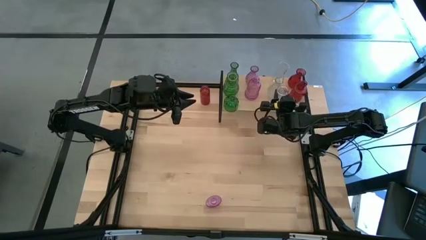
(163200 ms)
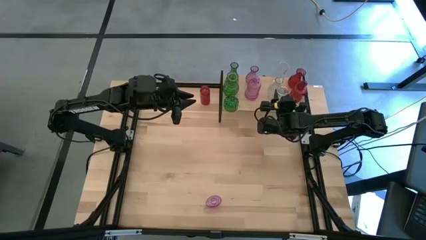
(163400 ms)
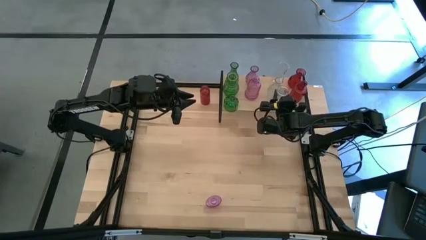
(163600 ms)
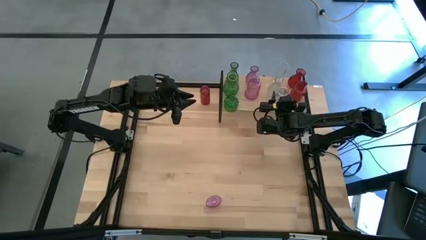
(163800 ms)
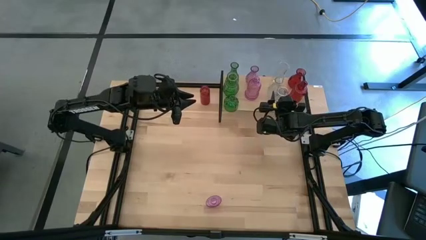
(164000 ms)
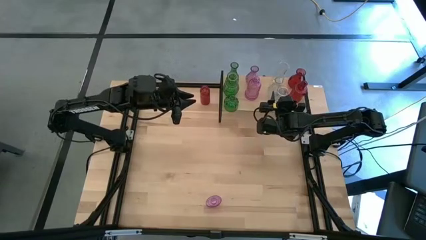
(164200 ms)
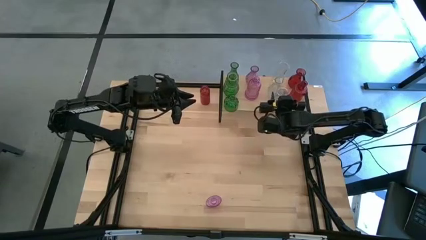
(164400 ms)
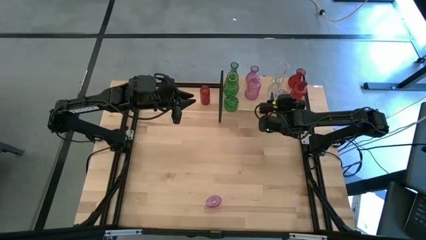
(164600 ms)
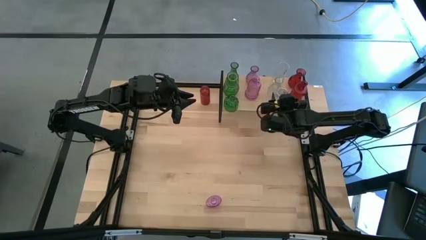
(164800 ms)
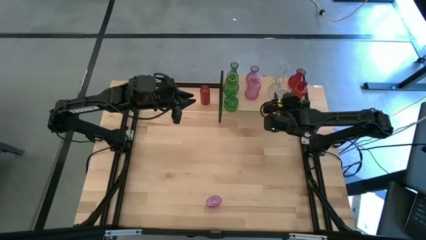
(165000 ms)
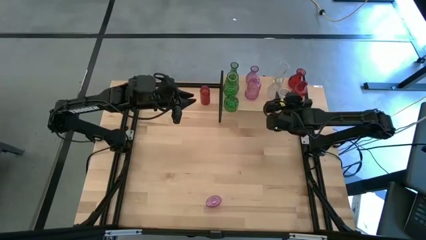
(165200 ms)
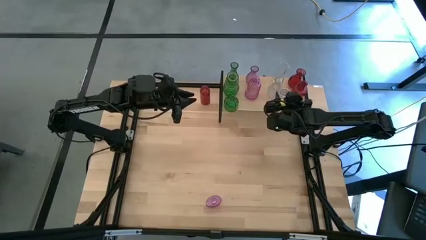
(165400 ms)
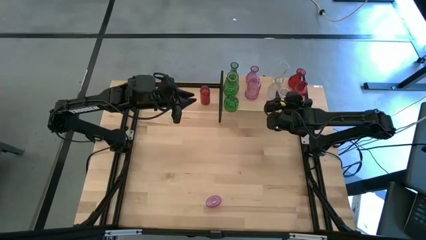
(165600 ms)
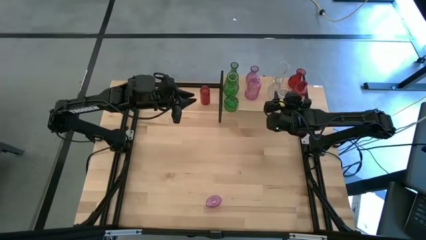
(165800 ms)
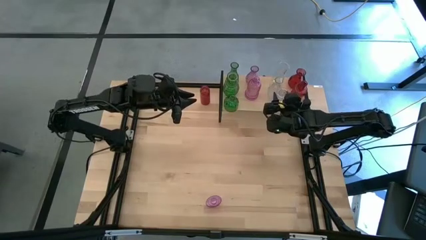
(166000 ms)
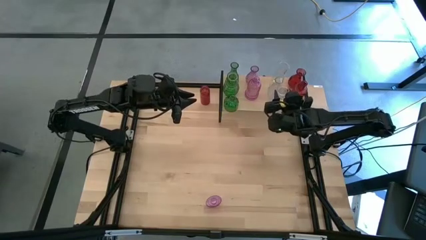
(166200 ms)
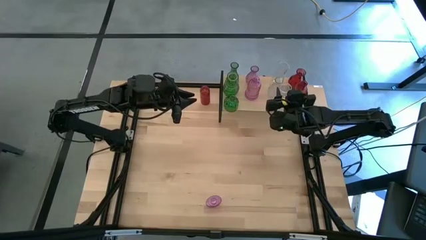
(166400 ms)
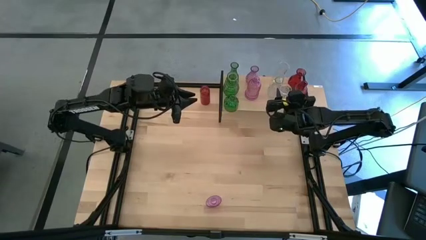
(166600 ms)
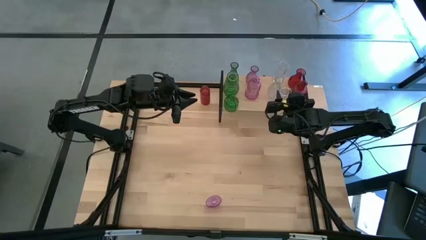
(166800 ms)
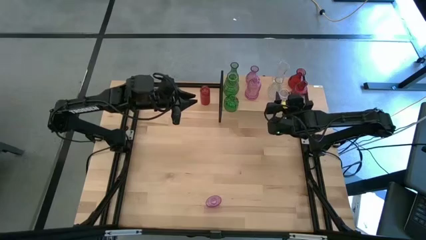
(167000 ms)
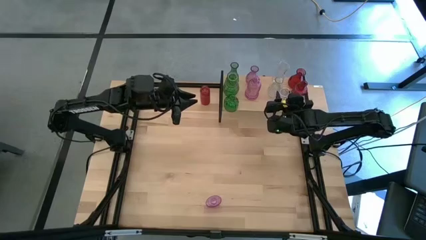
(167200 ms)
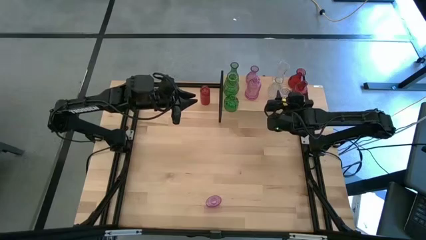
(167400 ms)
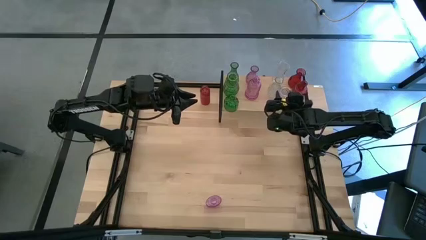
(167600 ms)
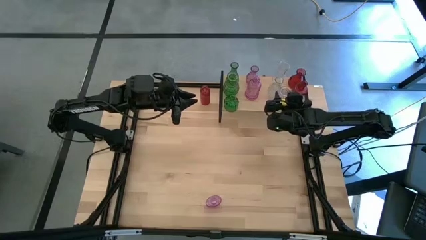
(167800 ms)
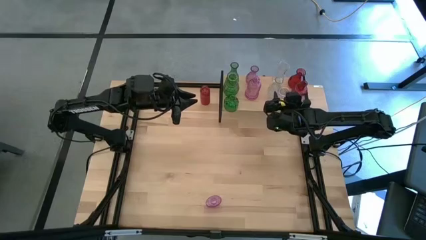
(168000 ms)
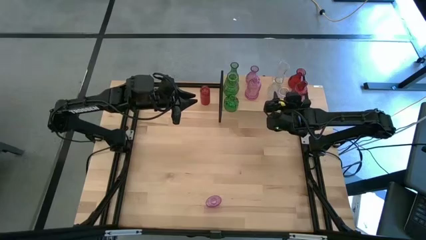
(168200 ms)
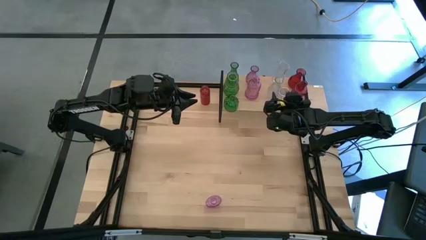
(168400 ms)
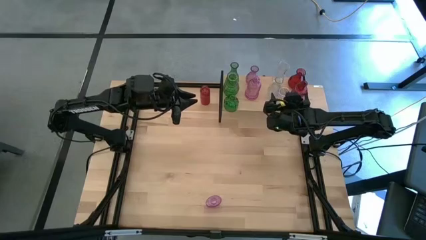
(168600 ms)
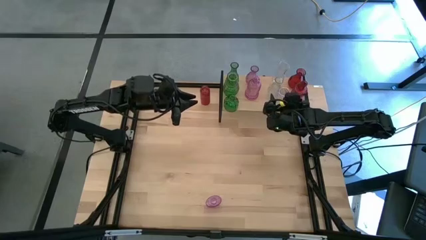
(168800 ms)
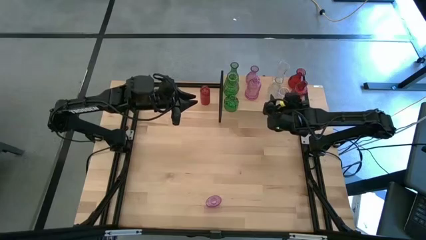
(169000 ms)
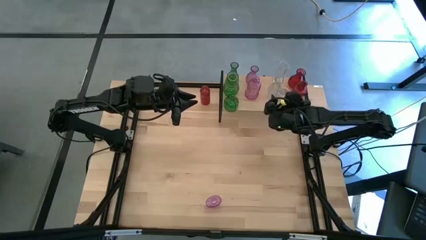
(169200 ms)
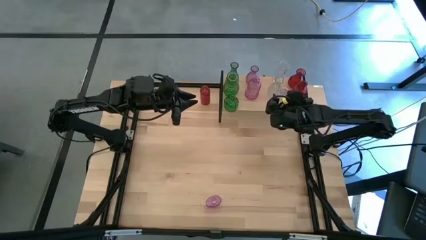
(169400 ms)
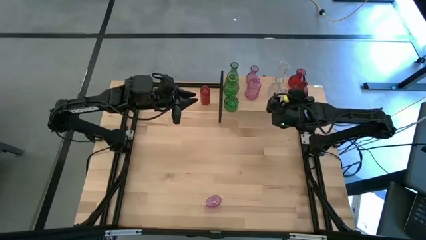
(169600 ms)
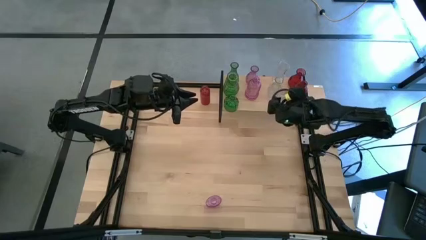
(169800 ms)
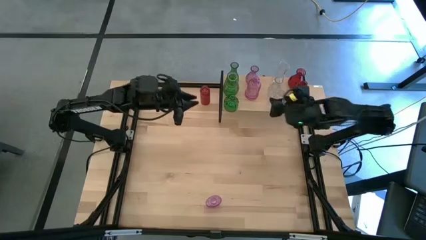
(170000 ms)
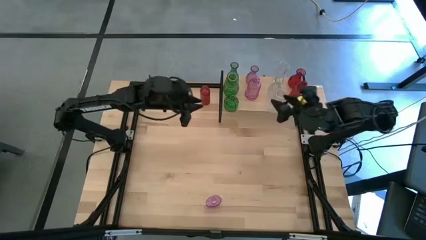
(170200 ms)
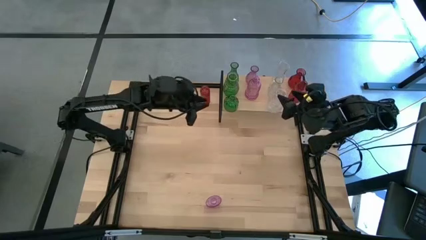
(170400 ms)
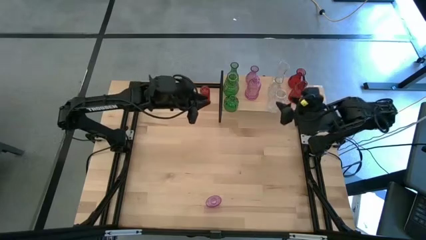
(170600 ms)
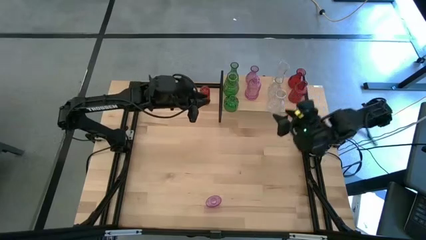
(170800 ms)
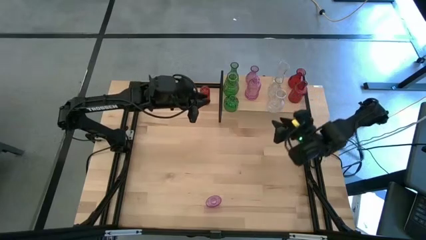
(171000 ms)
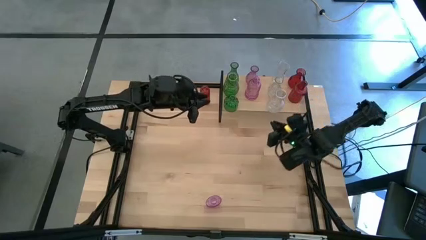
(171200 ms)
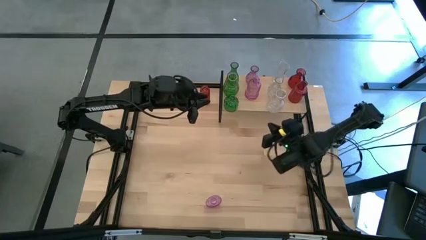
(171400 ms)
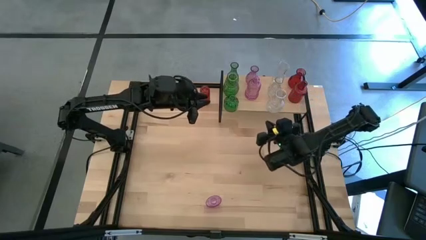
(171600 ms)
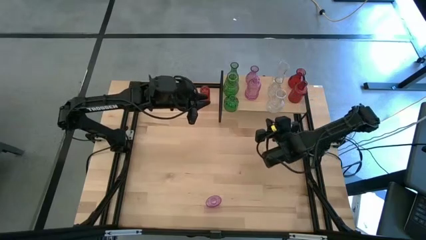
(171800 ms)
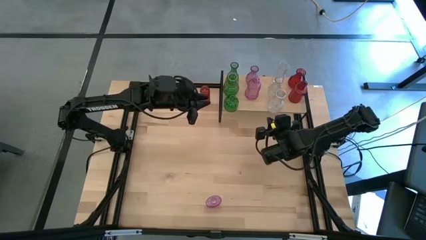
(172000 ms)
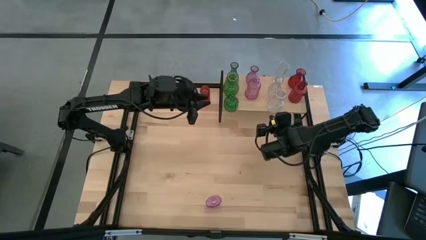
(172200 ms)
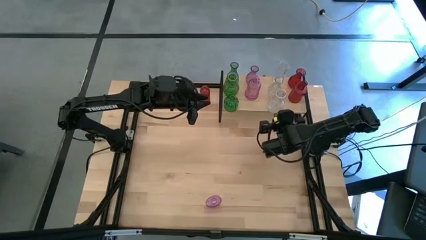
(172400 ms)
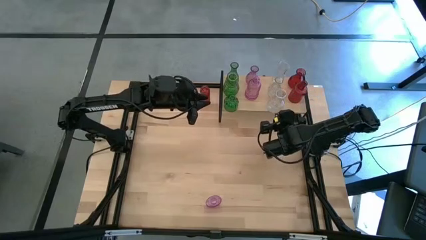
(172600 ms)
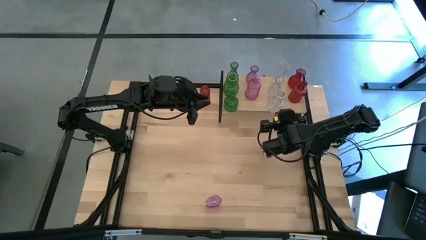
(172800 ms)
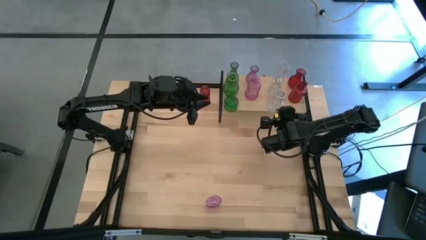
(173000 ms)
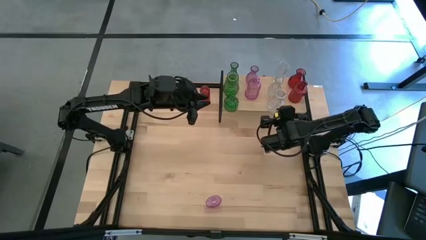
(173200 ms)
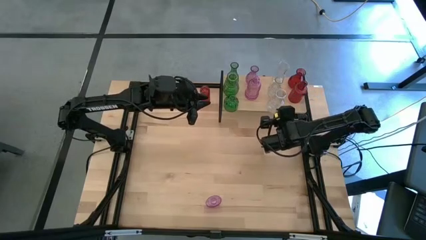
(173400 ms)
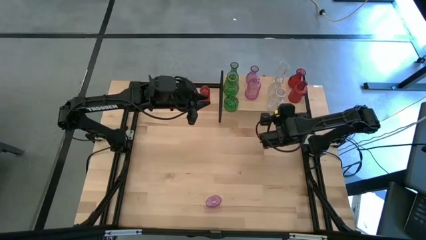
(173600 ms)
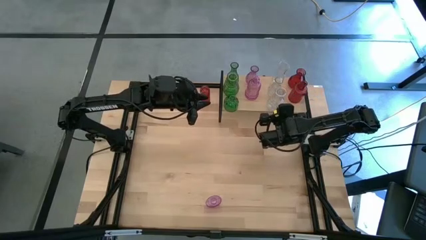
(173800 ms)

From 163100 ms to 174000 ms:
Task: sort vases onto shelf
Put the transparent vase on the shelf aligned with the other transparent vases

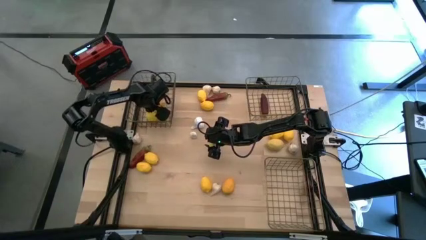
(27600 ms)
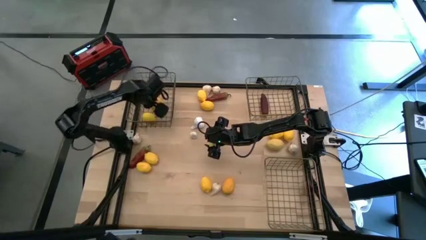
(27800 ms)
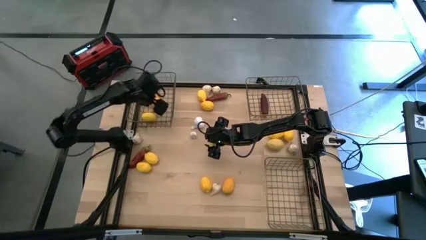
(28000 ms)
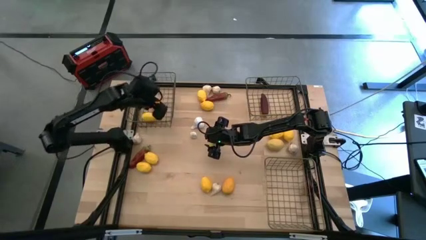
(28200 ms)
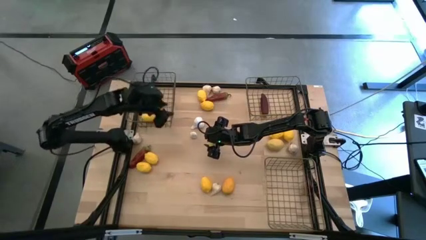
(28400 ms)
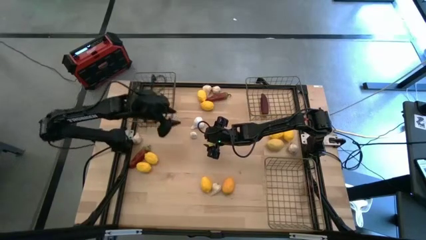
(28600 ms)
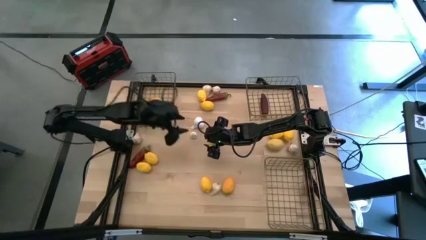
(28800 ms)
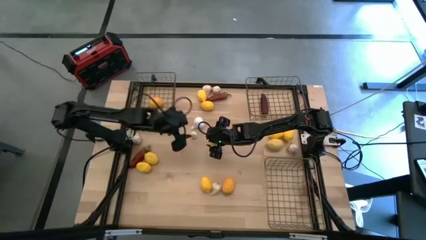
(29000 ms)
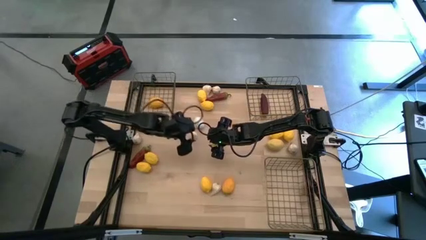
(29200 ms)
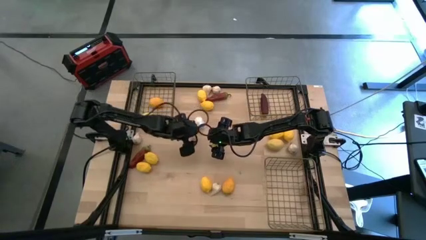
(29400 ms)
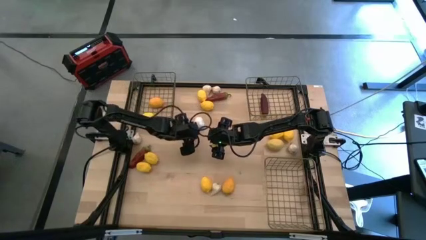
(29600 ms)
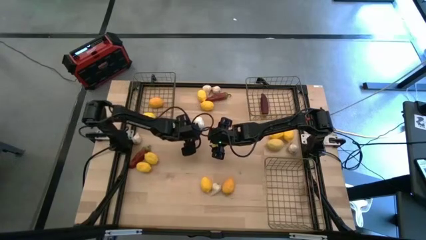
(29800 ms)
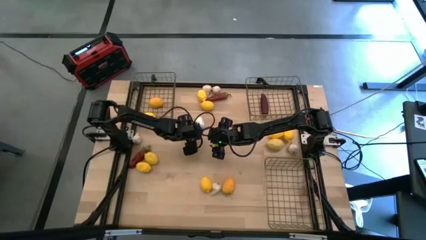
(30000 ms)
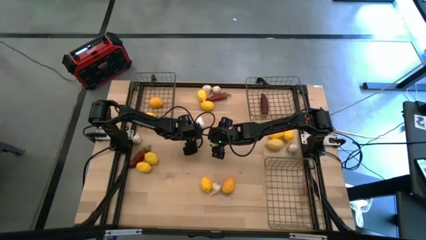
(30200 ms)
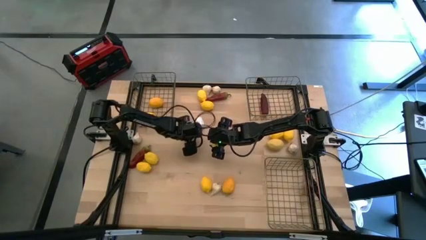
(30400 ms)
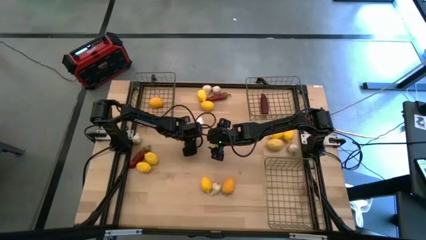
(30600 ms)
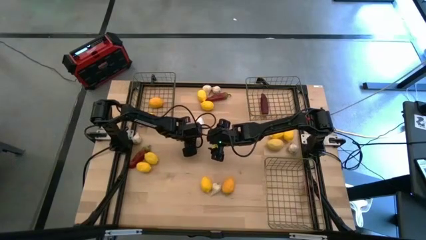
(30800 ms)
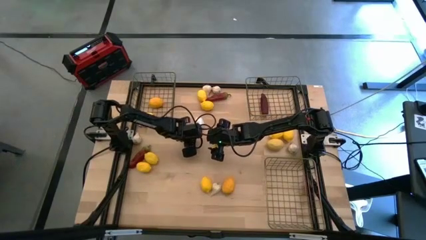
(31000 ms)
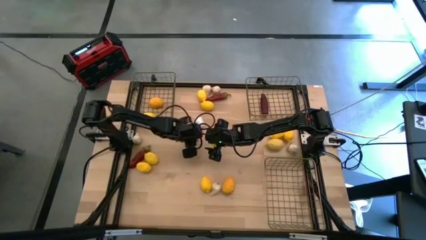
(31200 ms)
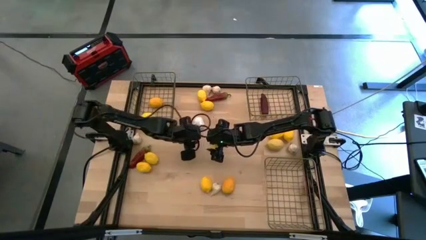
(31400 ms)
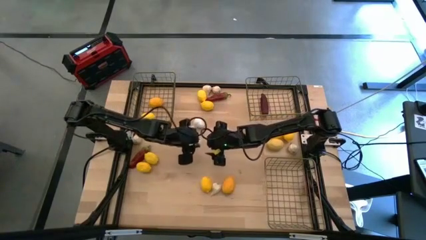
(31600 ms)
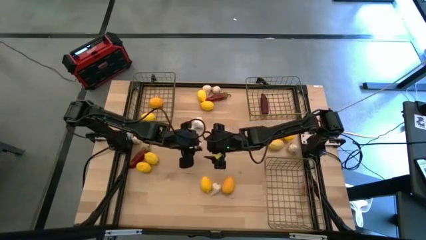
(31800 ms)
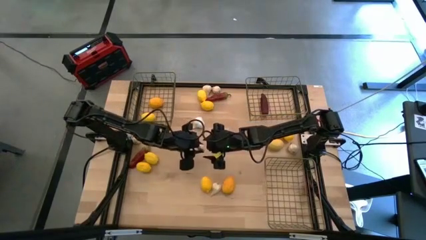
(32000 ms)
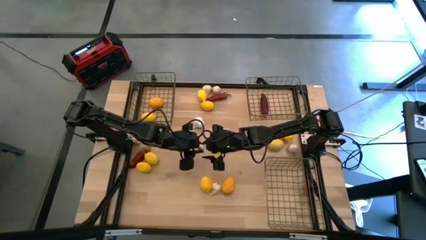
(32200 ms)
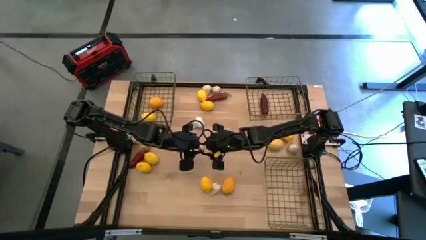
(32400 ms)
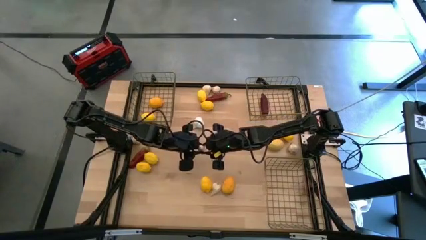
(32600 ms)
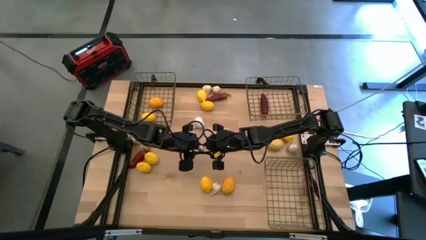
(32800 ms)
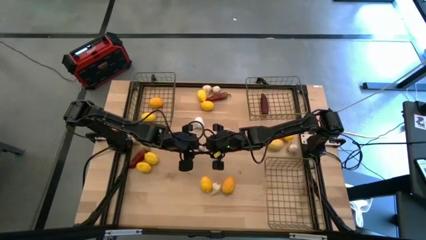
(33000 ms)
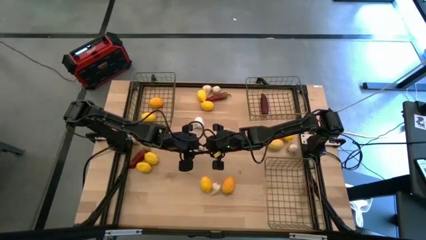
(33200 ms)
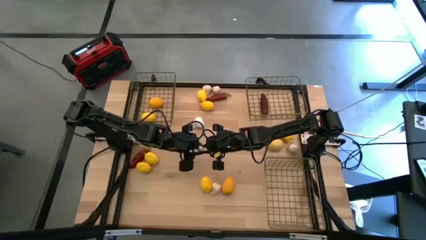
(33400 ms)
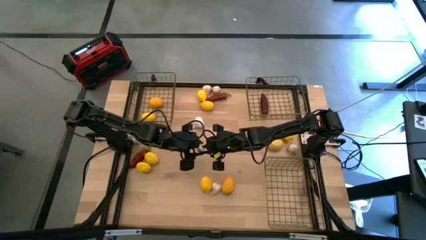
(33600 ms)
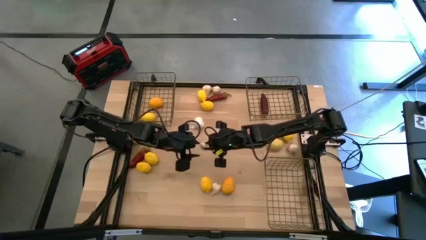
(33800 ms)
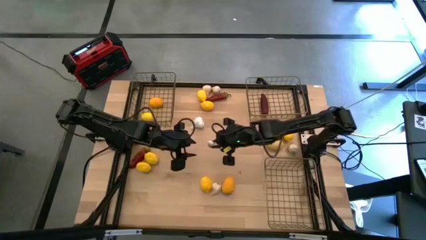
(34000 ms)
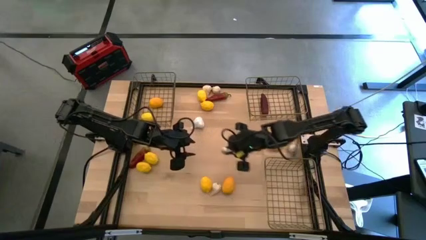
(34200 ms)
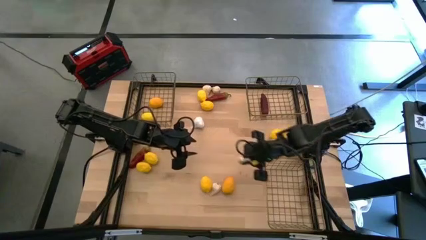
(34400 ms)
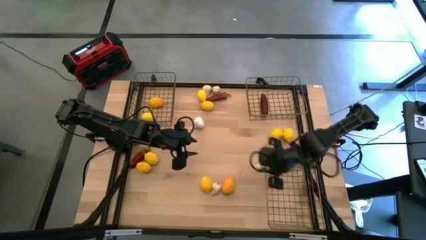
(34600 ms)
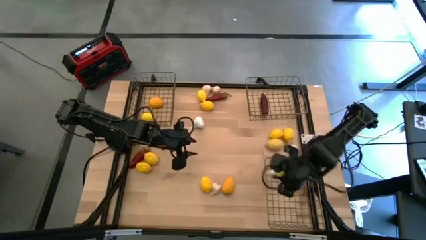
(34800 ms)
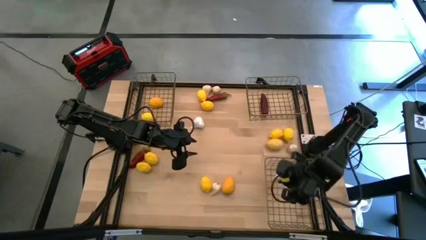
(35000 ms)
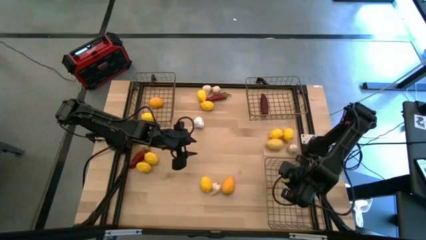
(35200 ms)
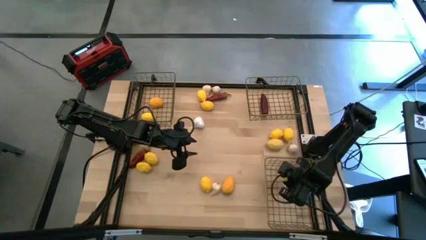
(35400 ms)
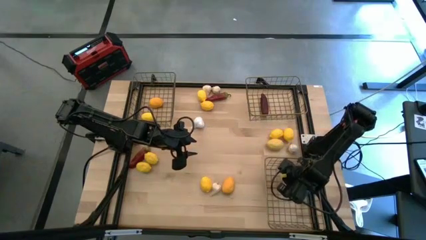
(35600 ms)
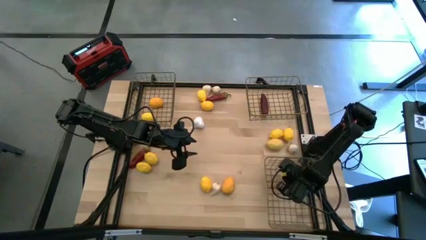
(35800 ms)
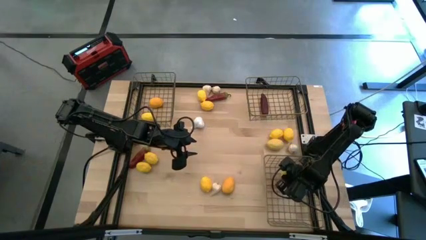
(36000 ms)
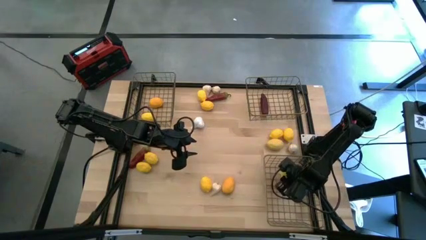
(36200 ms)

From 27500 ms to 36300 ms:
Task: Sort produce into baskets
Put the white garlic into the bottom wire basket
